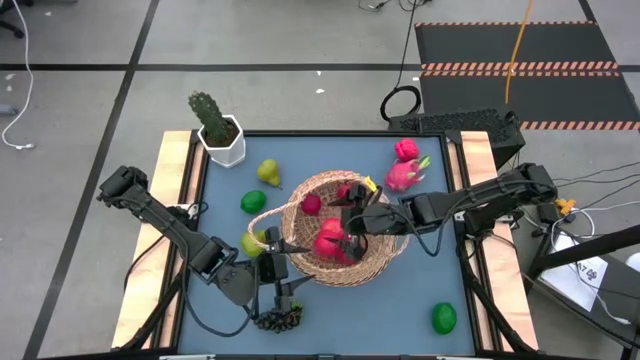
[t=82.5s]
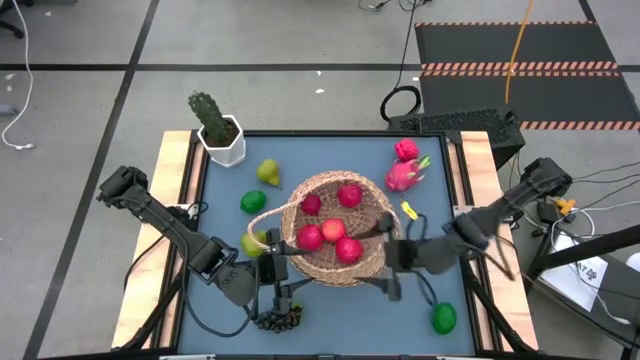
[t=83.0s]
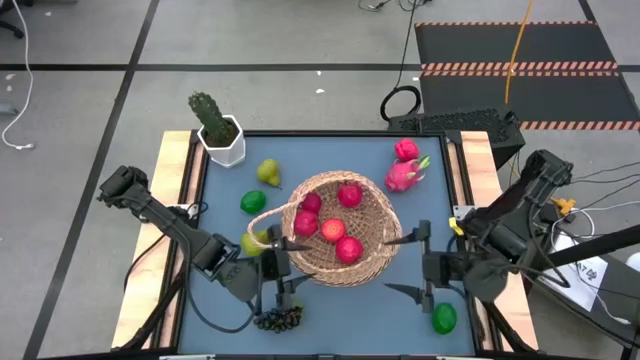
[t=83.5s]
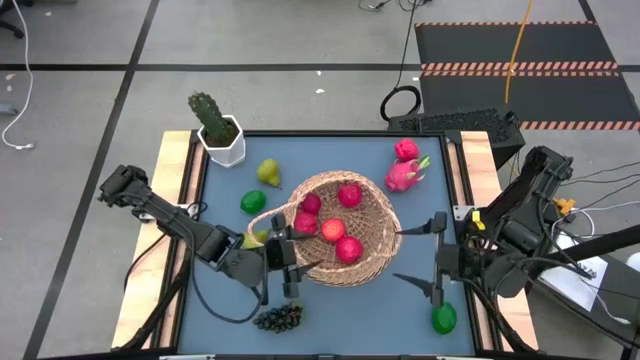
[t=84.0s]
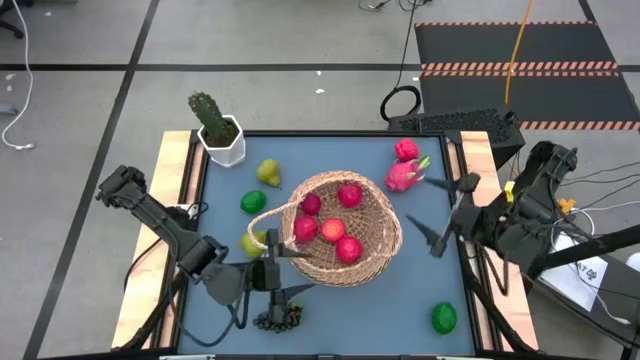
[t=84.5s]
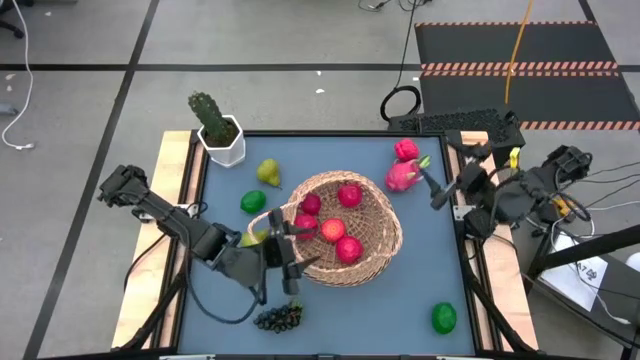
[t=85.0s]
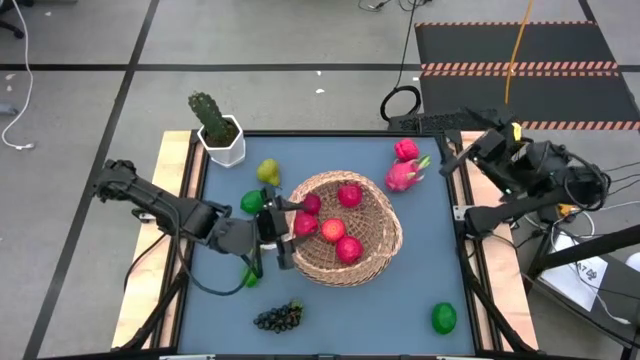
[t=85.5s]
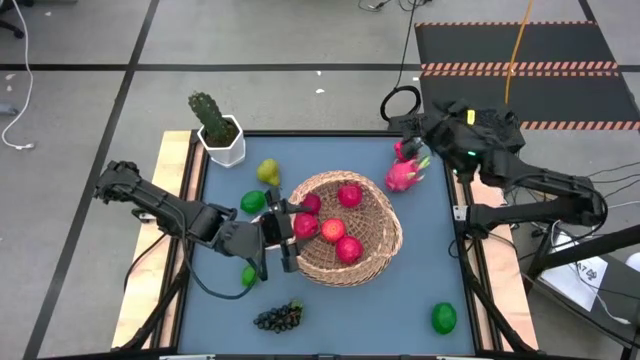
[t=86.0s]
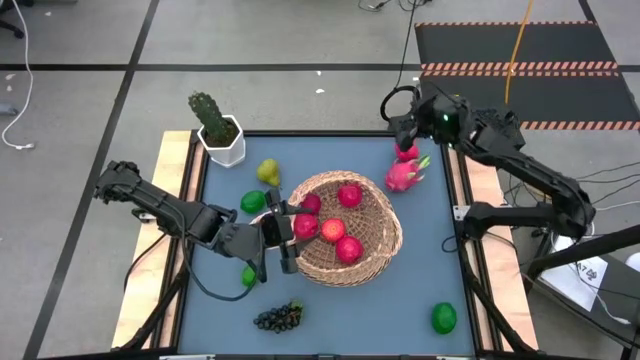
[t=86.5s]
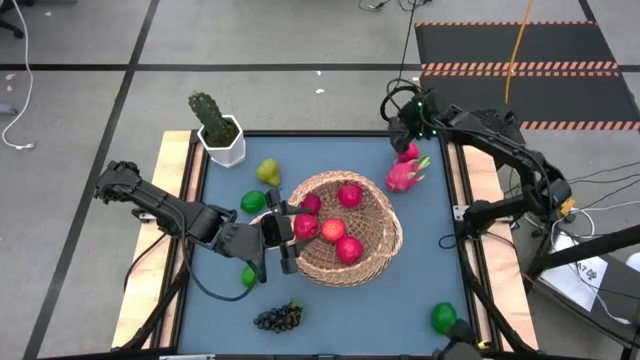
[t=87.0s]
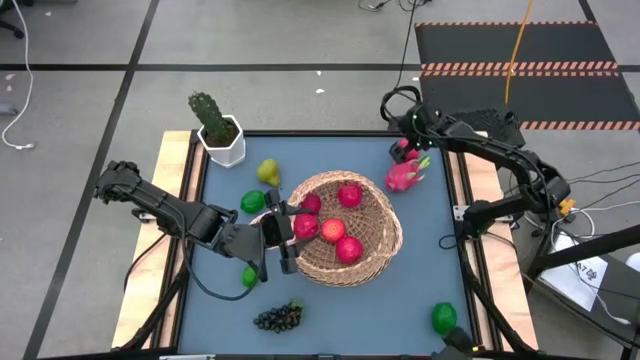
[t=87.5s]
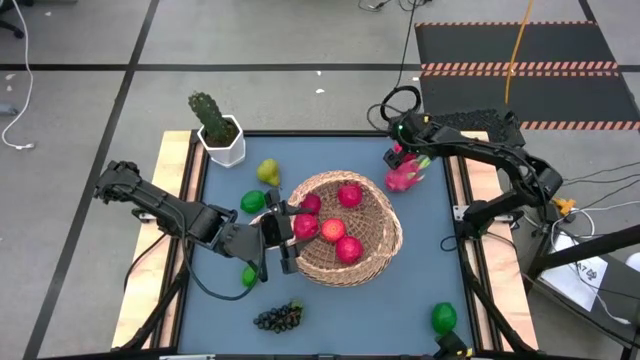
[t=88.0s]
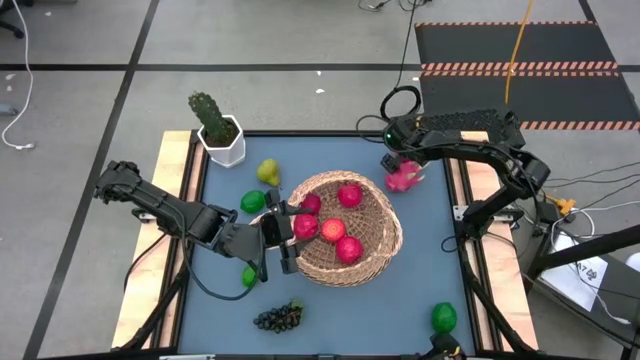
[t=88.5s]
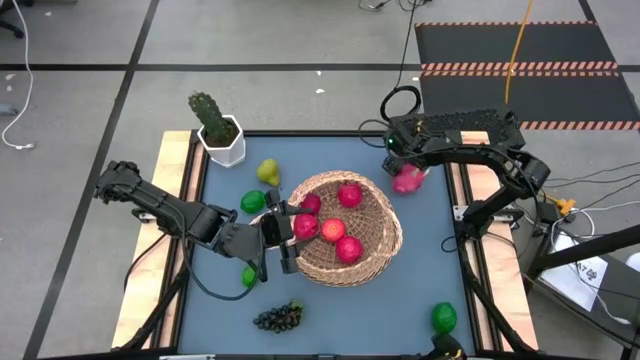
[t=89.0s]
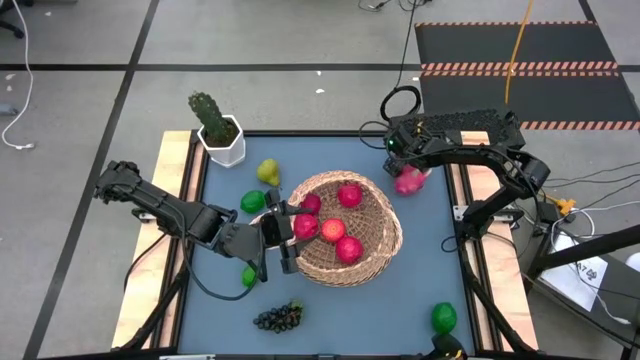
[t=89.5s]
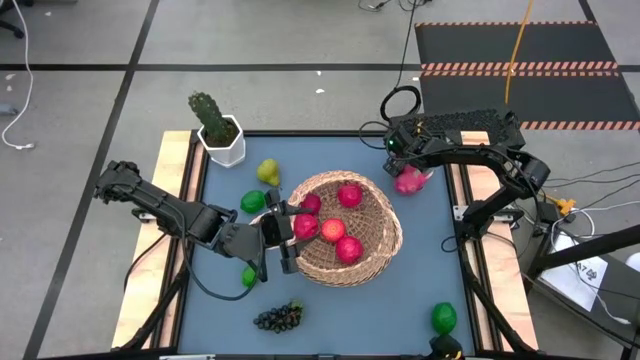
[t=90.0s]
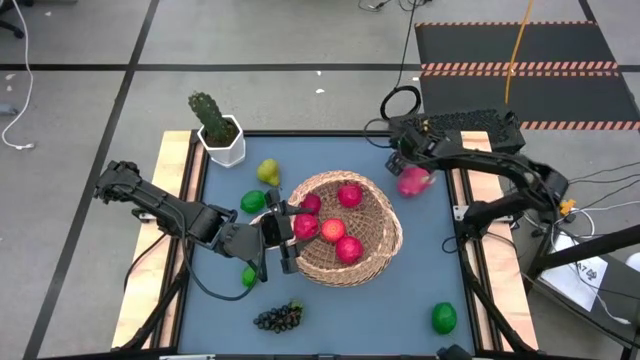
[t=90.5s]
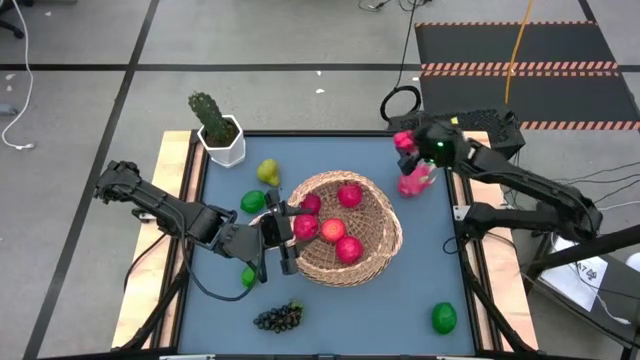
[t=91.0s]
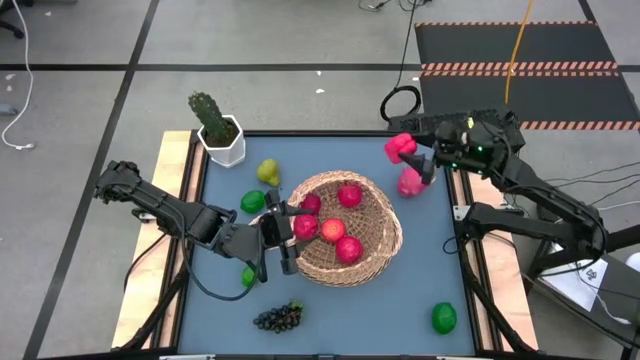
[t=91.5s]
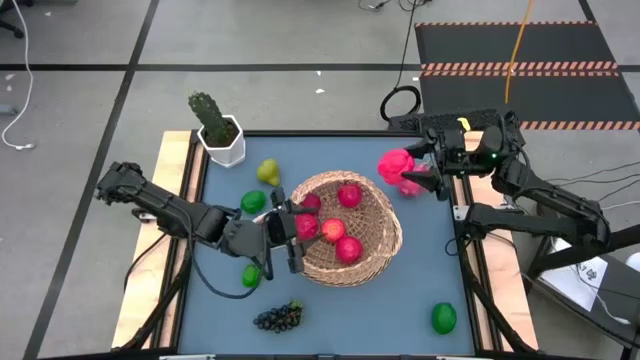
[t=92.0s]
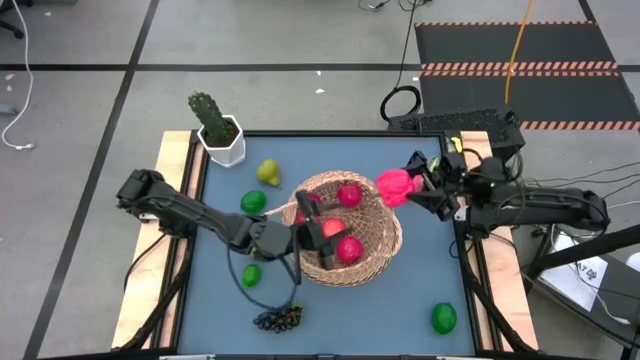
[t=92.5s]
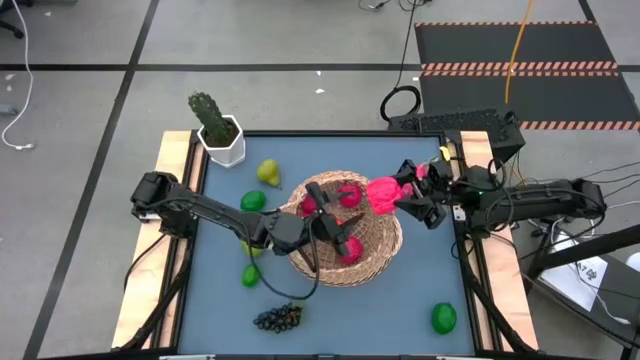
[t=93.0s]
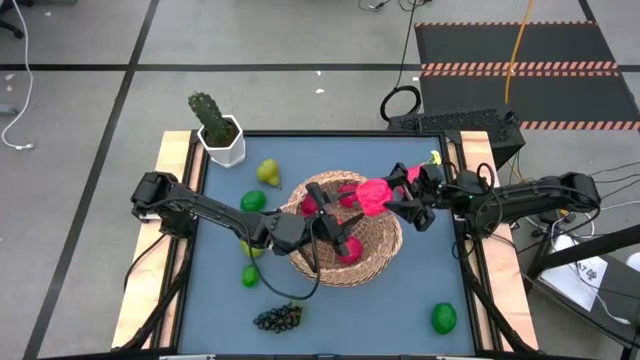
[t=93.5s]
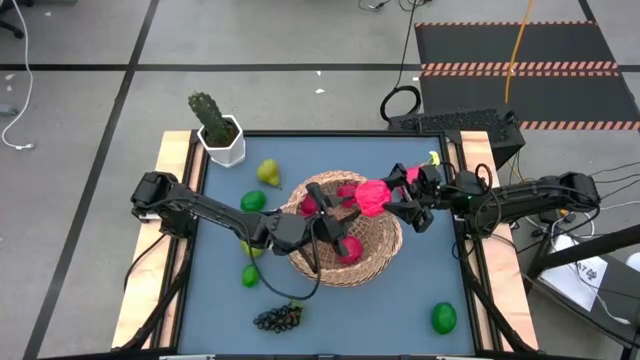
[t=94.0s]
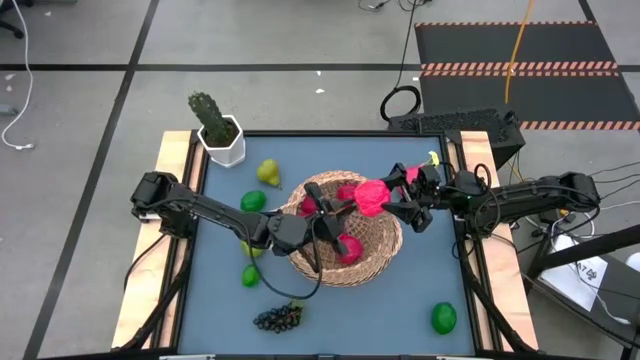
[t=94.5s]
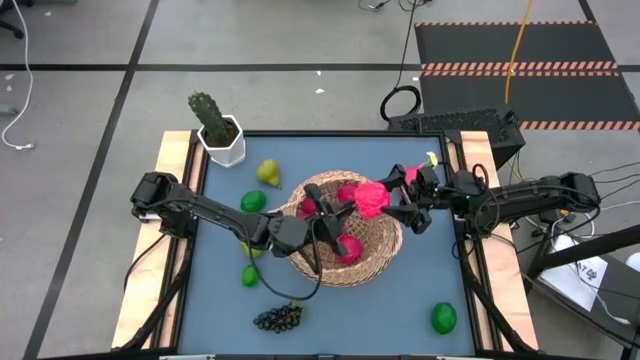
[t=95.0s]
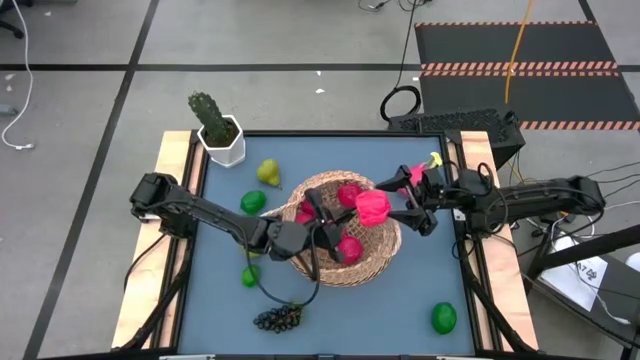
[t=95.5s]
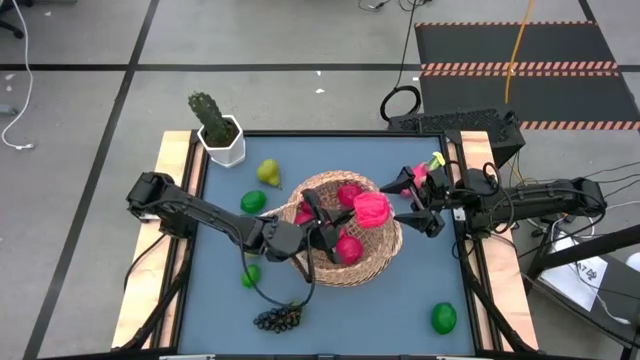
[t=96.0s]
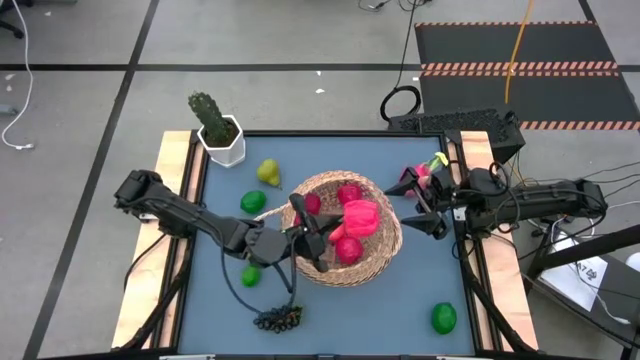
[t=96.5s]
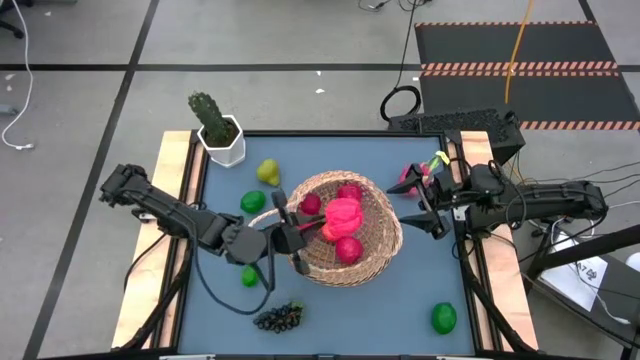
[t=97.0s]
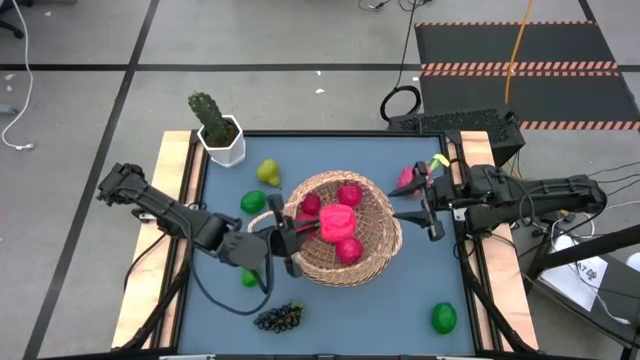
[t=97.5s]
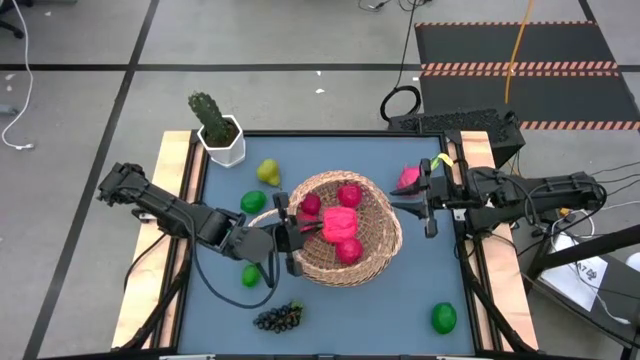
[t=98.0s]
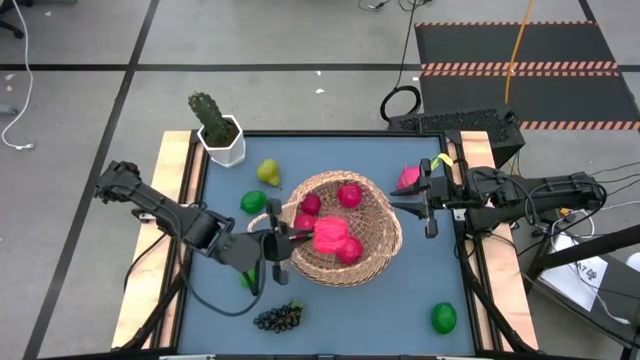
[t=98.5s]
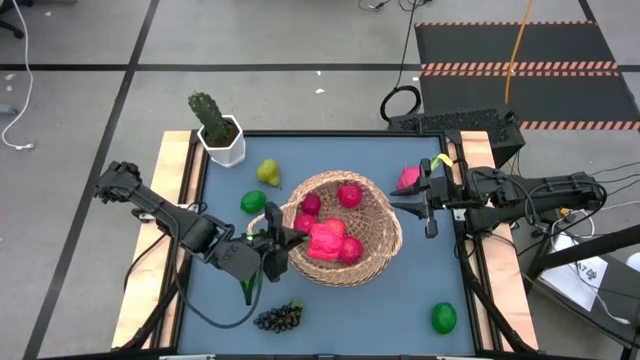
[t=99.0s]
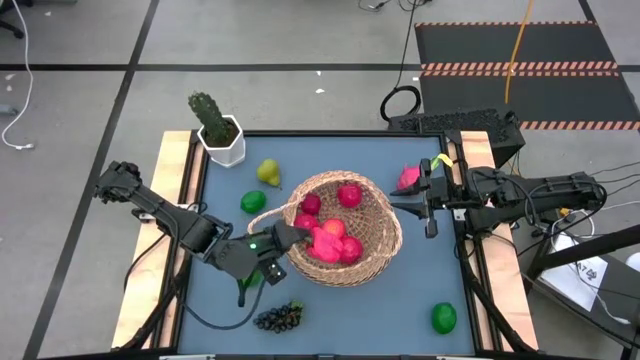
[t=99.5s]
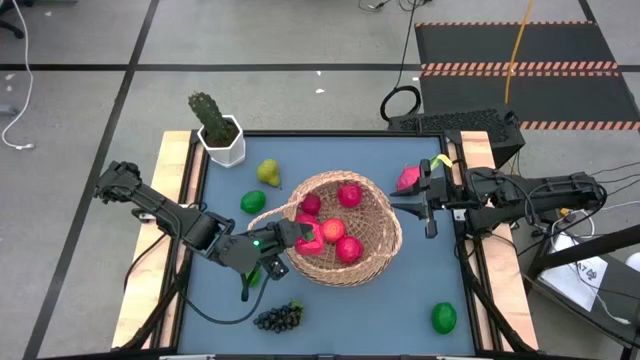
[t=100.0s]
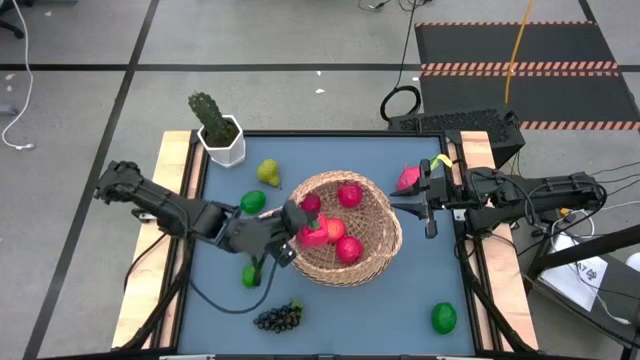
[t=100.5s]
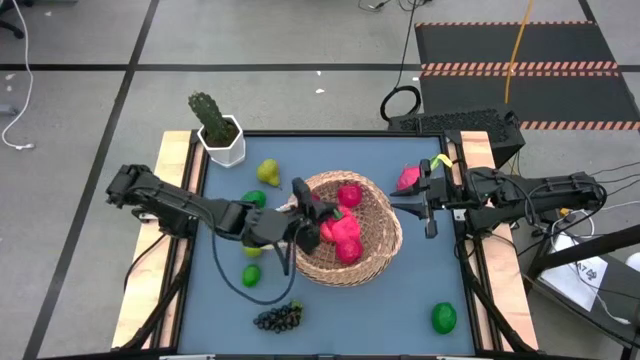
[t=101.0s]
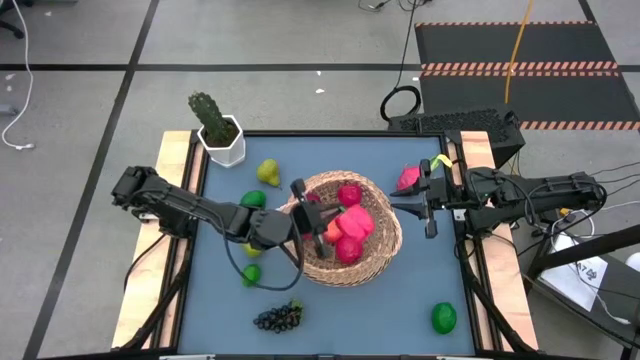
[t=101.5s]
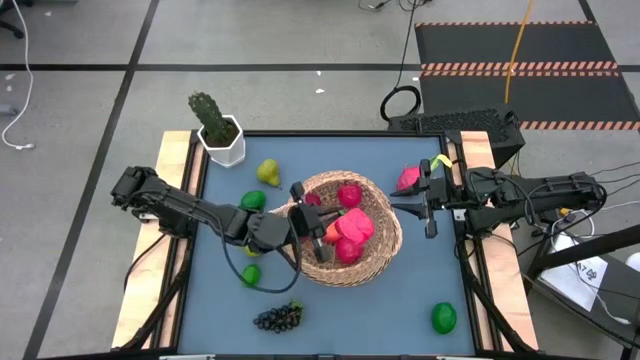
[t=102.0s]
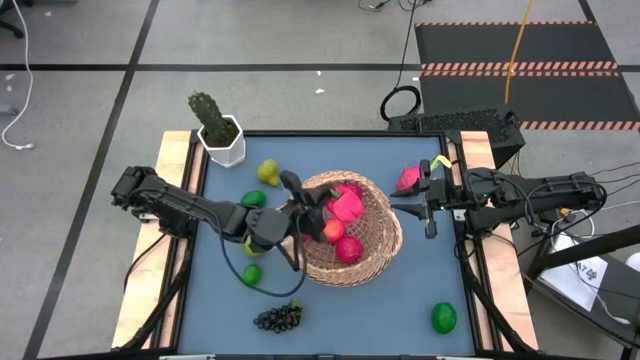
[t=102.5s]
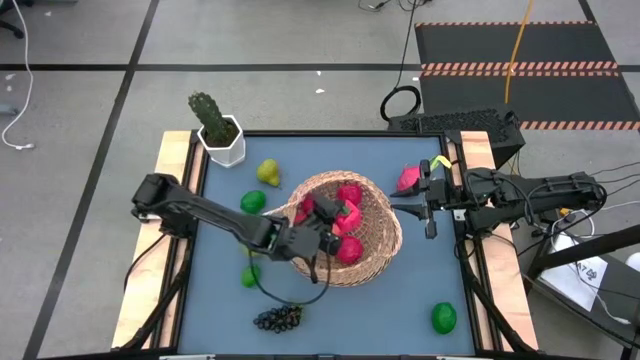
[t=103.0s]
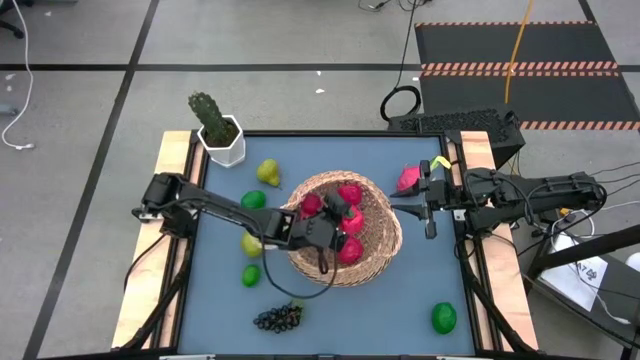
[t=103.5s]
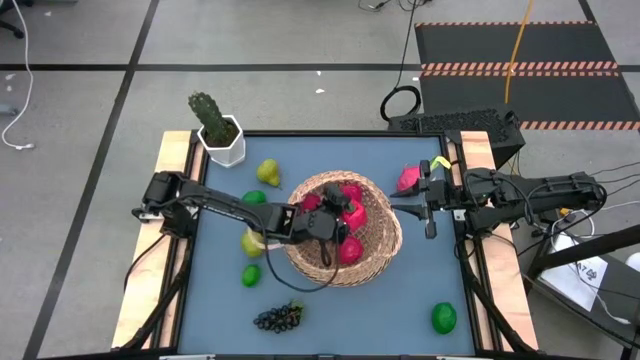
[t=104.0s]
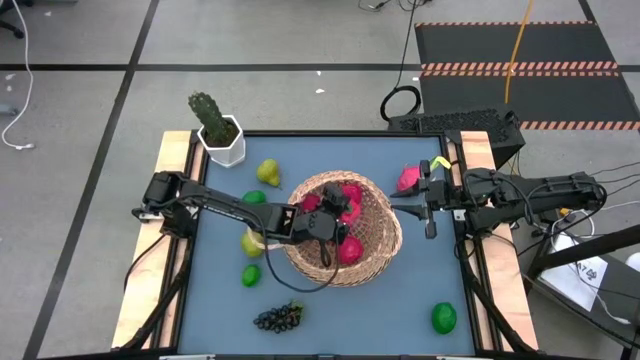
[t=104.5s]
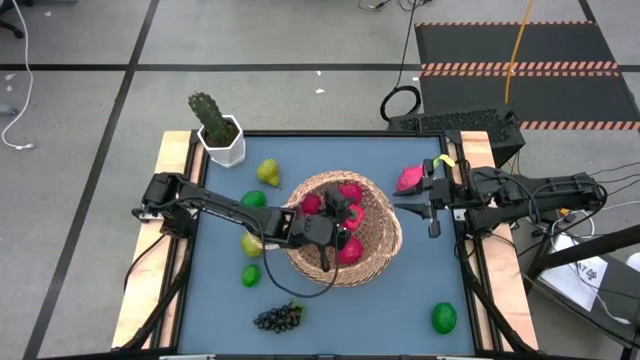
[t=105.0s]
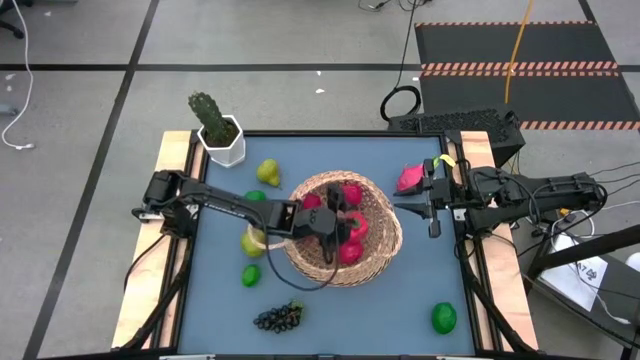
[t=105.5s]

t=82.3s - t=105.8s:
Task: Build produce basket
Put the red bell pepper into the brown basket
